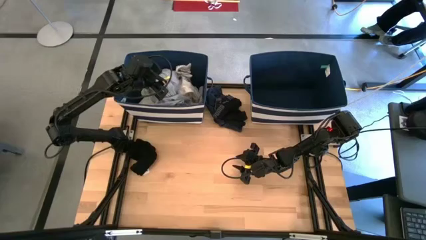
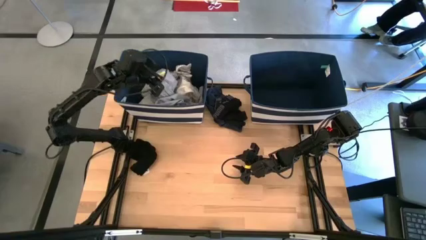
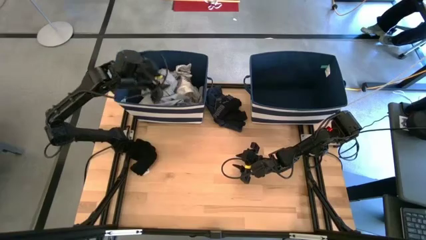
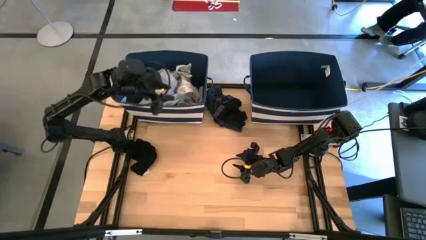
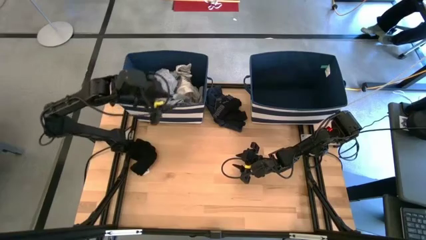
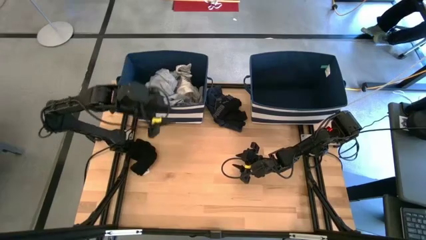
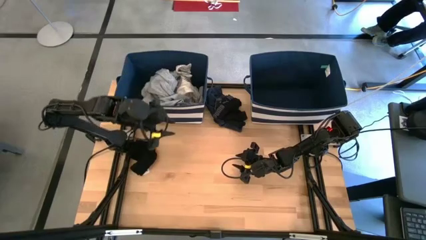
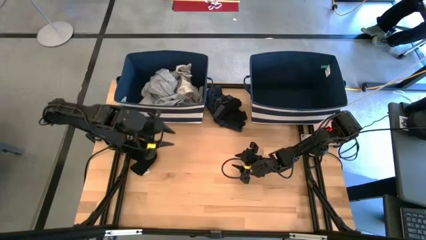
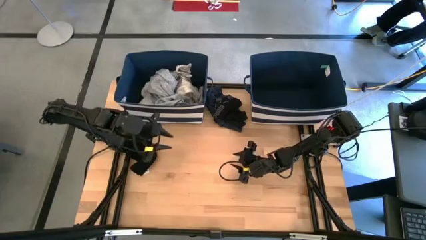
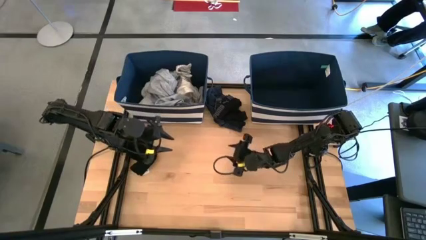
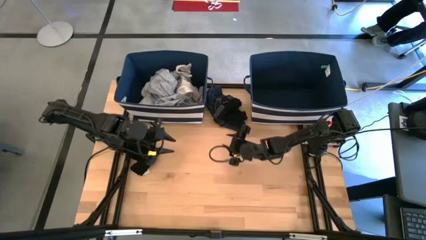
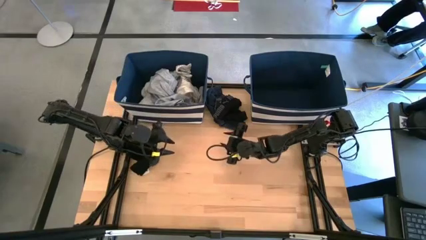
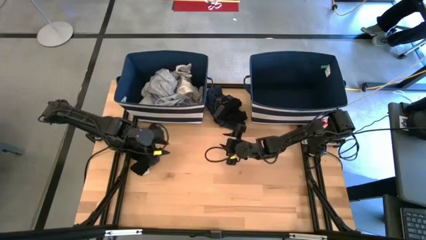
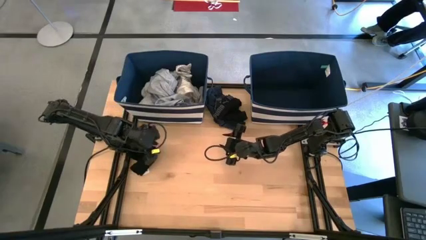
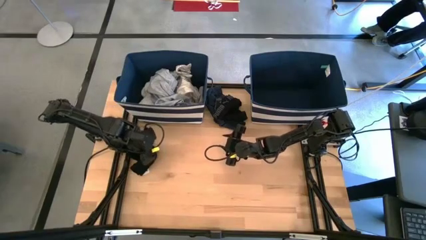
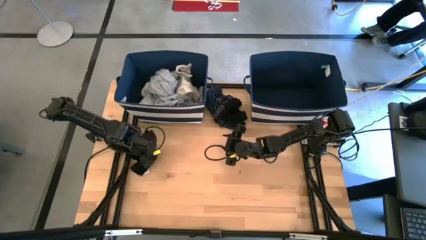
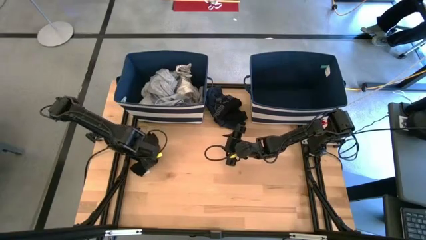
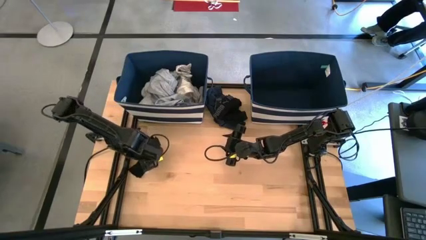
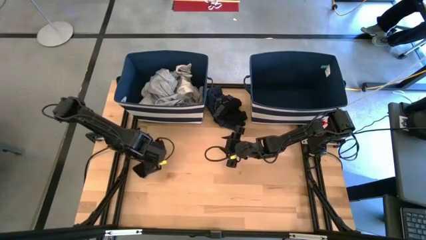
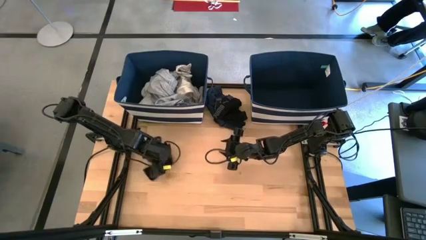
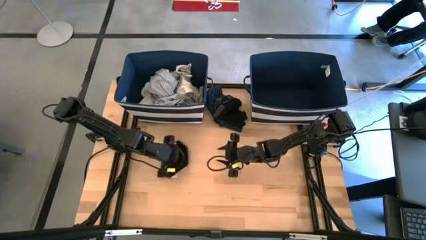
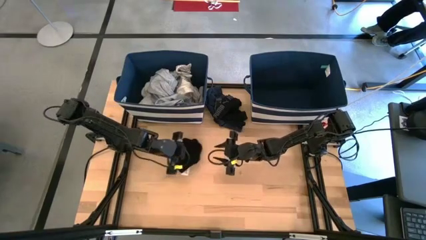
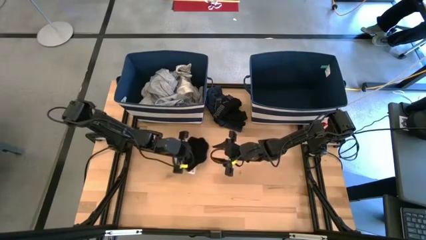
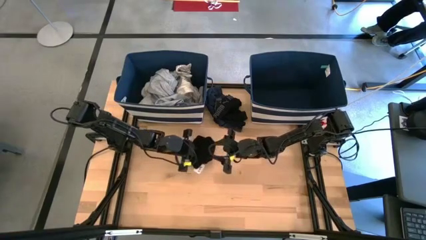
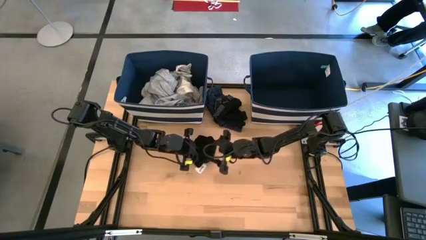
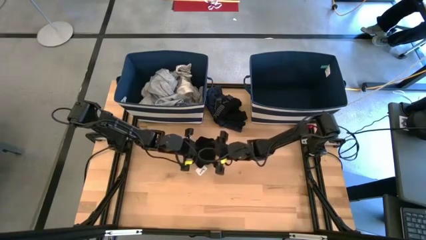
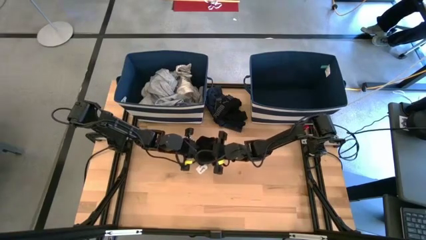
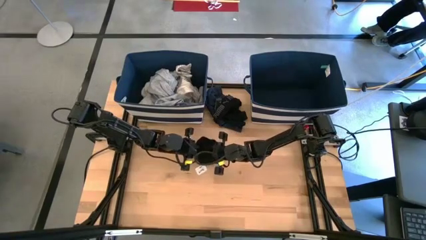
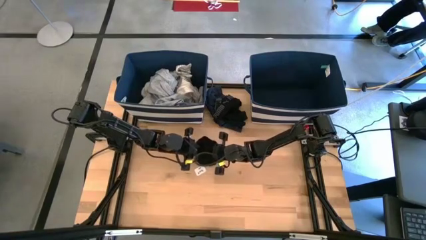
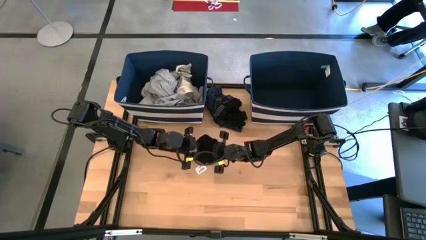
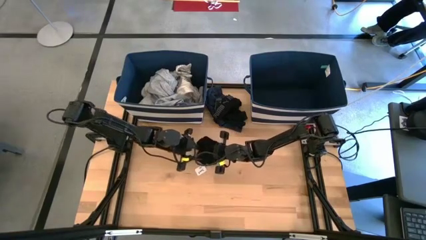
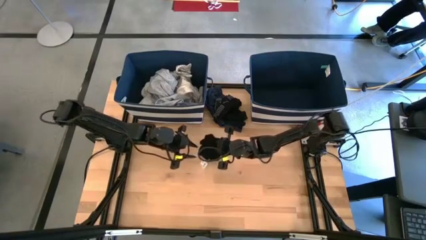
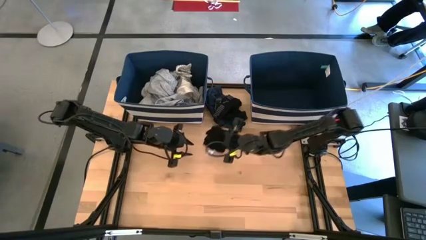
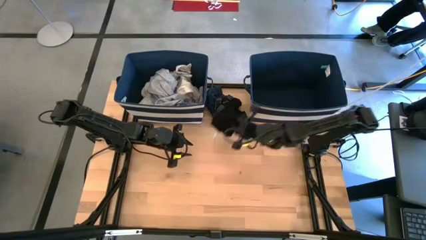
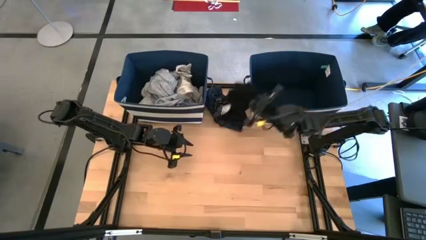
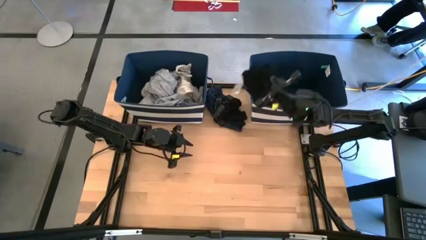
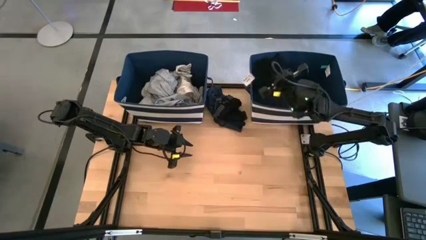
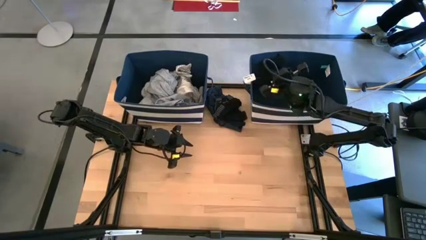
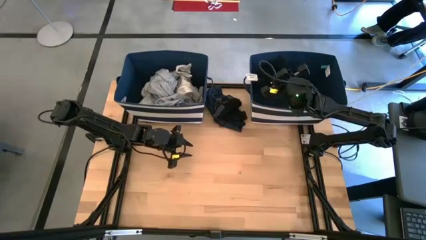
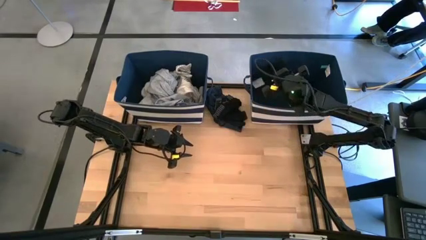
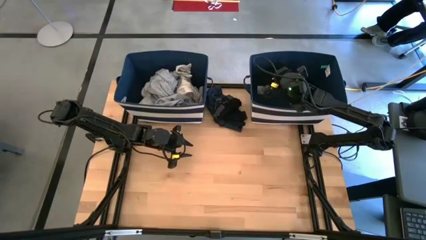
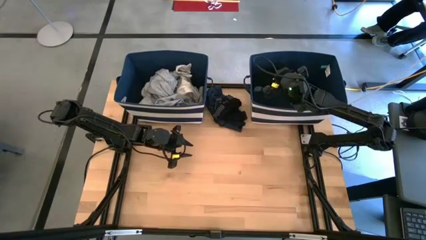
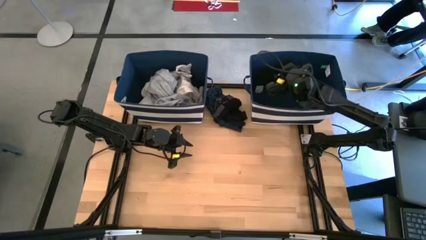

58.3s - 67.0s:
Task: Sort clothes
Put the black shorts into the right blue bin

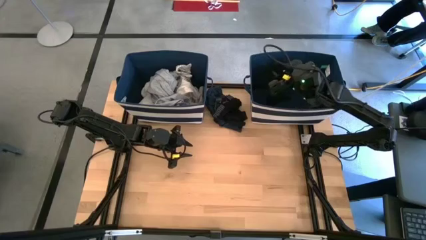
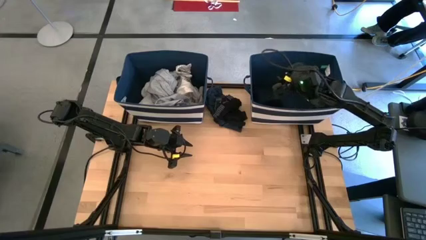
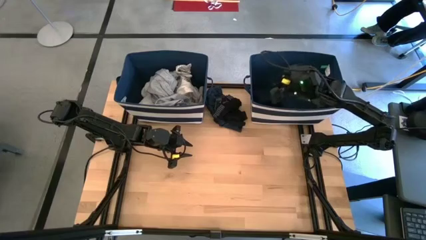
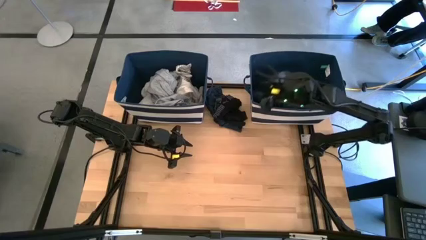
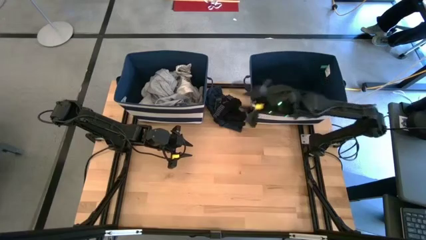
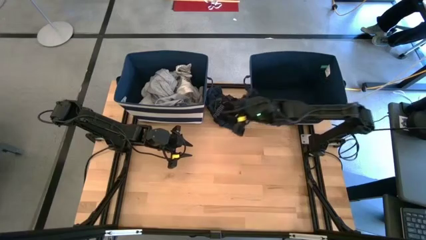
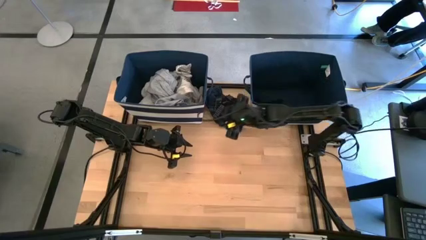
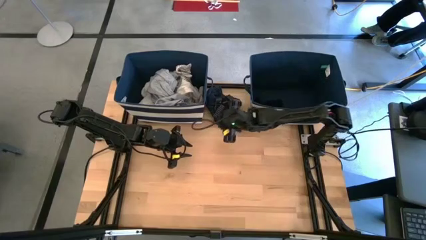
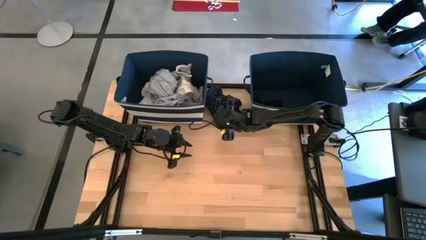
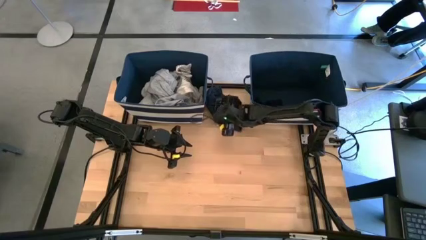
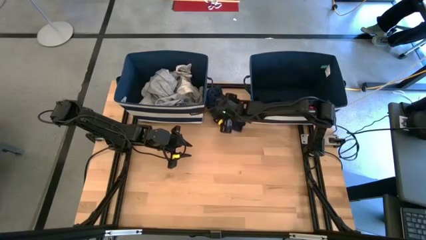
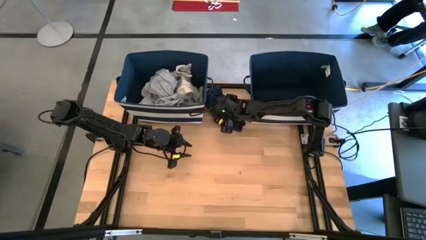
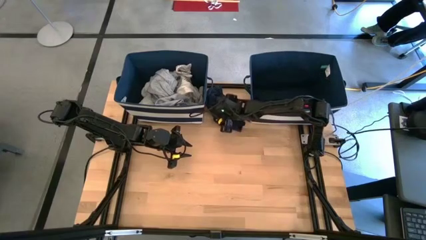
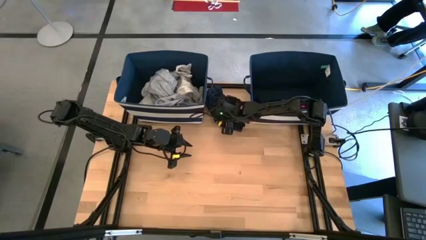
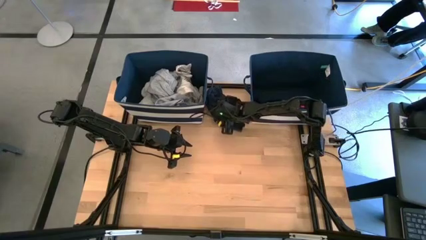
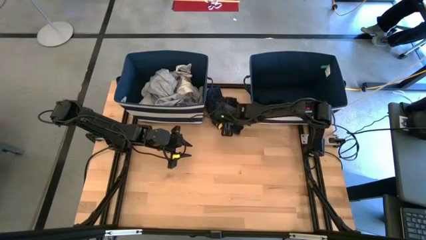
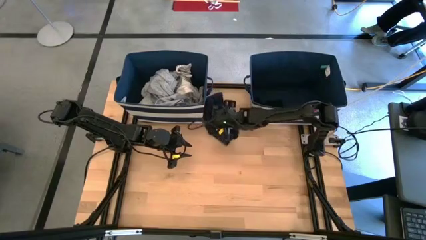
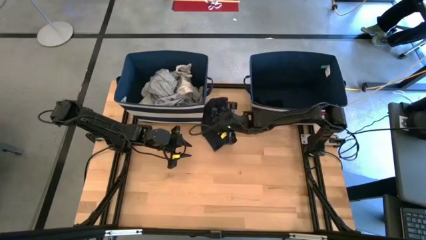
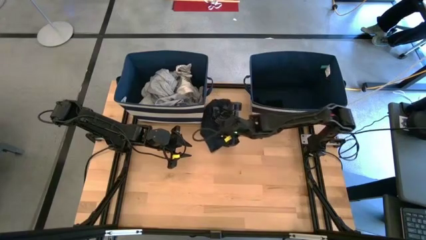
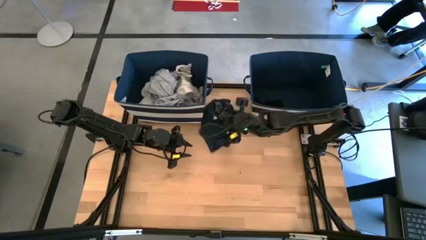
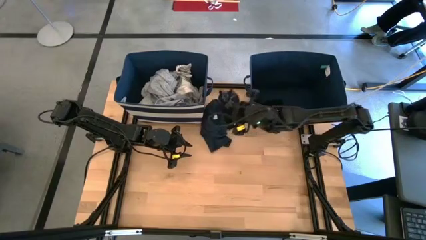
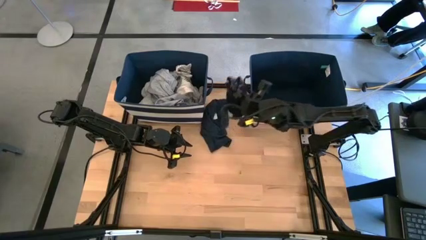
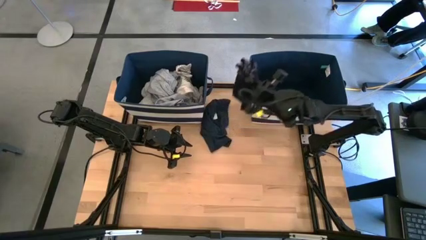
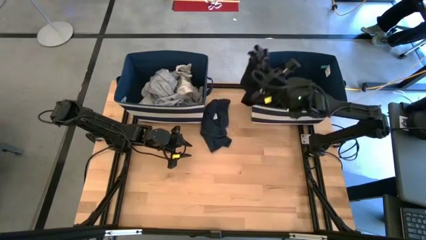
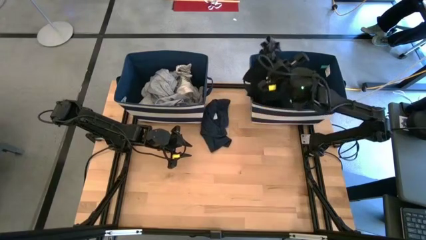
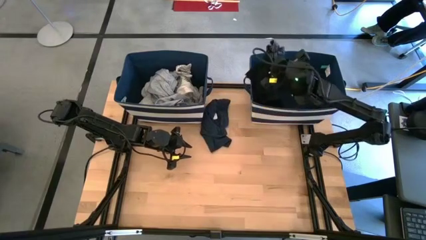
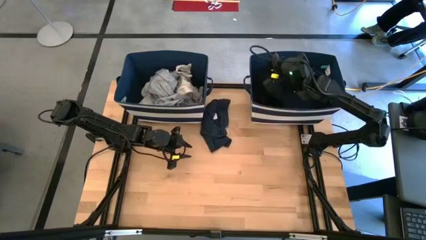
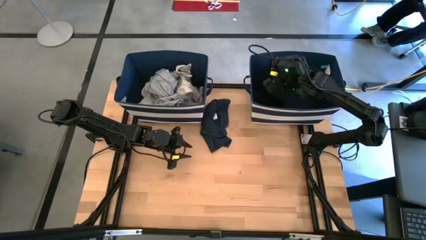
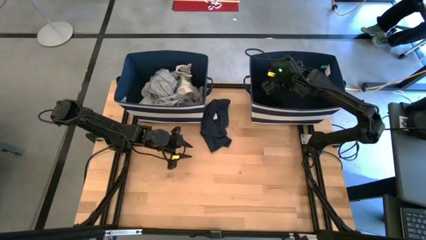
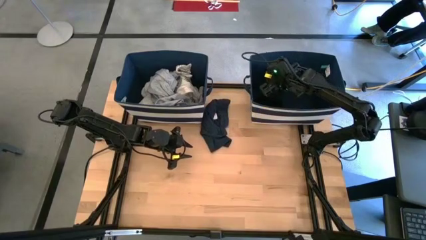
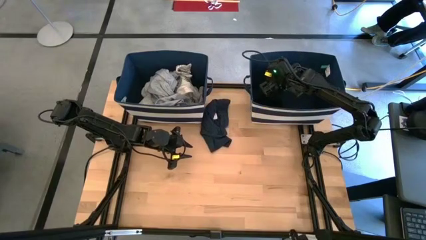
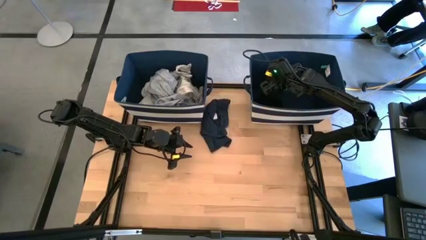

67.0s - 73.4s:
Put the black underwear into the right blue bin
